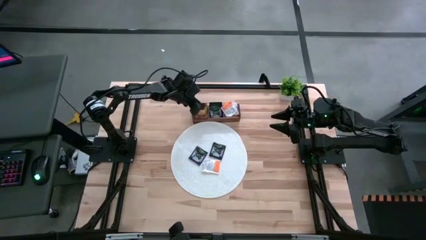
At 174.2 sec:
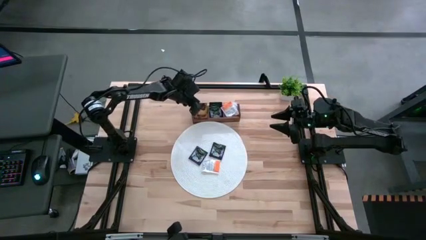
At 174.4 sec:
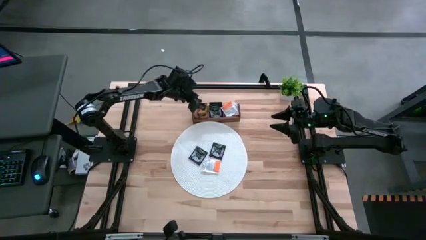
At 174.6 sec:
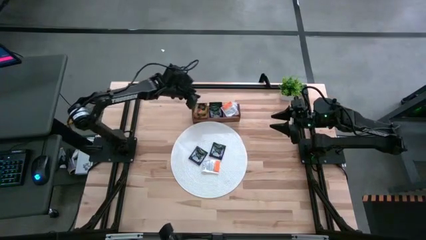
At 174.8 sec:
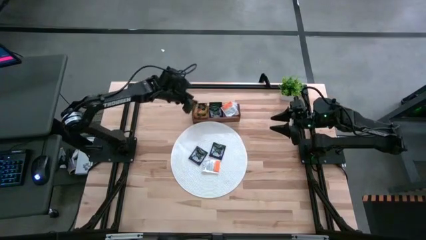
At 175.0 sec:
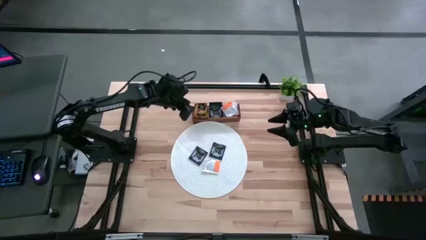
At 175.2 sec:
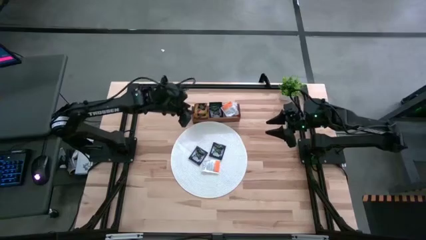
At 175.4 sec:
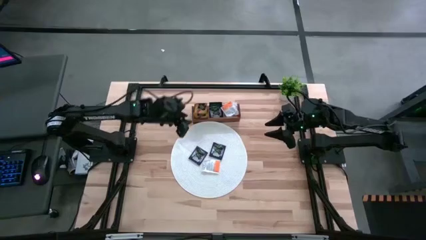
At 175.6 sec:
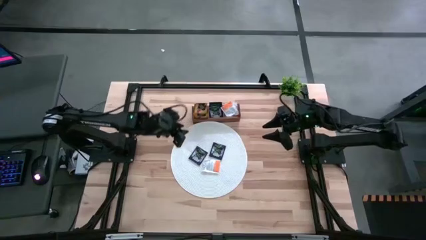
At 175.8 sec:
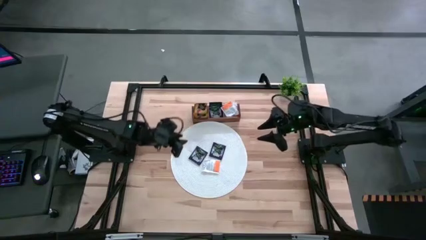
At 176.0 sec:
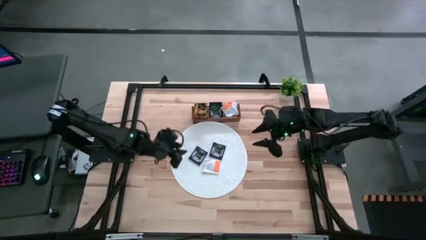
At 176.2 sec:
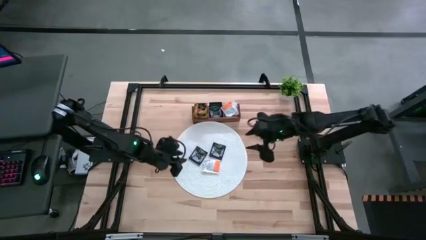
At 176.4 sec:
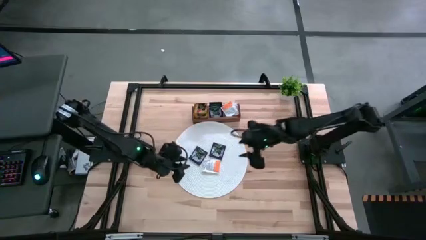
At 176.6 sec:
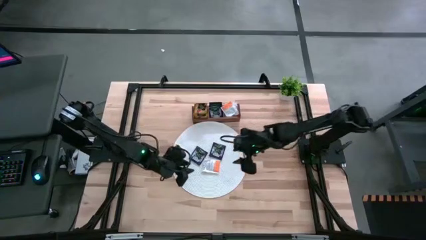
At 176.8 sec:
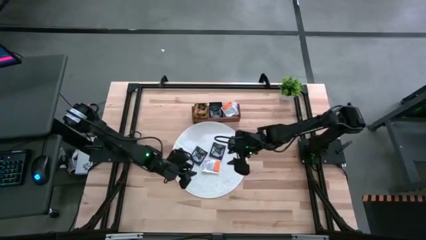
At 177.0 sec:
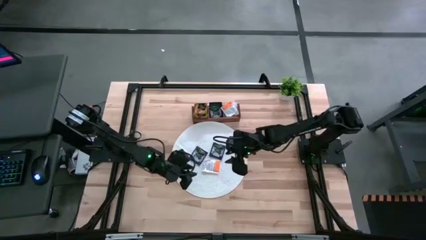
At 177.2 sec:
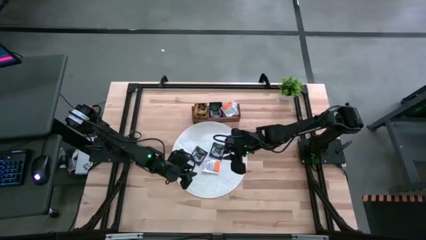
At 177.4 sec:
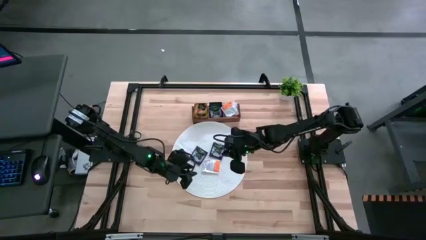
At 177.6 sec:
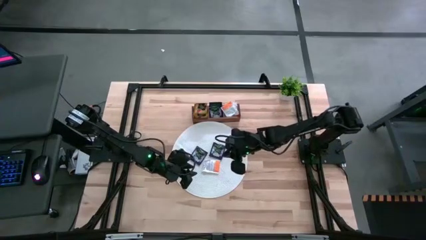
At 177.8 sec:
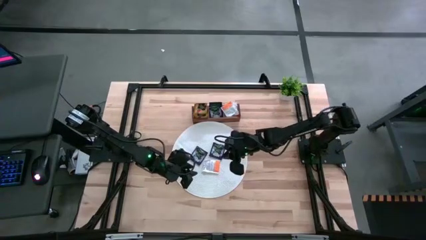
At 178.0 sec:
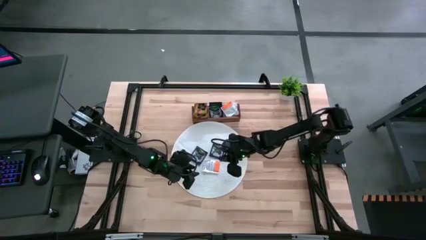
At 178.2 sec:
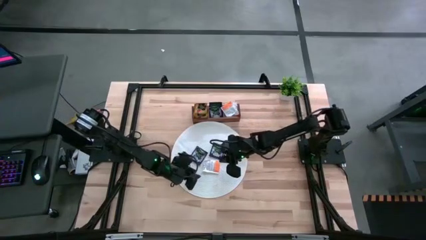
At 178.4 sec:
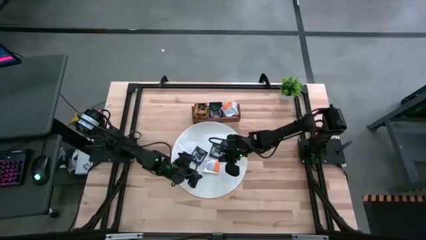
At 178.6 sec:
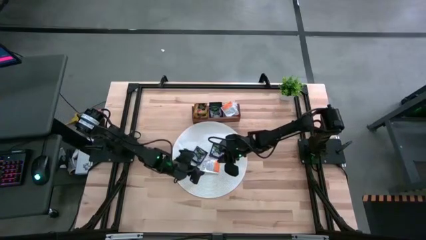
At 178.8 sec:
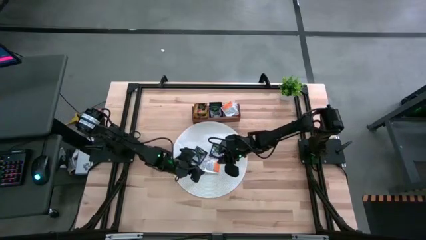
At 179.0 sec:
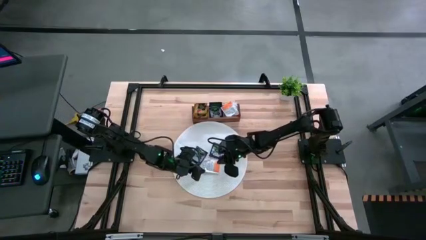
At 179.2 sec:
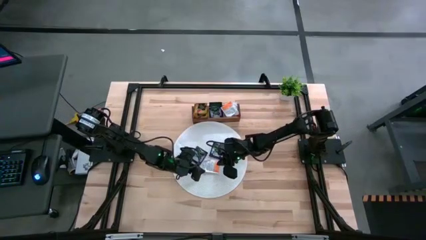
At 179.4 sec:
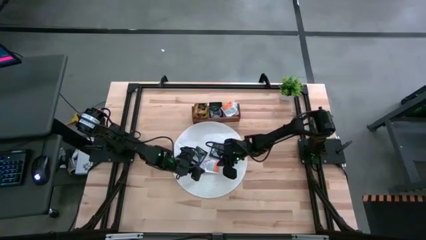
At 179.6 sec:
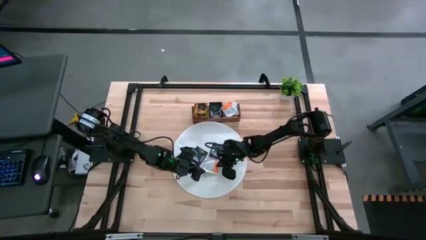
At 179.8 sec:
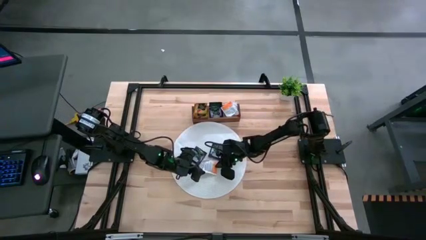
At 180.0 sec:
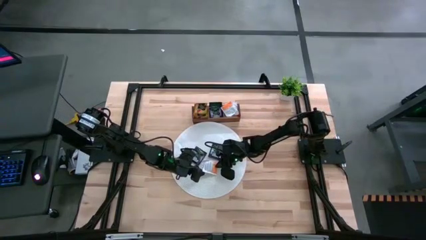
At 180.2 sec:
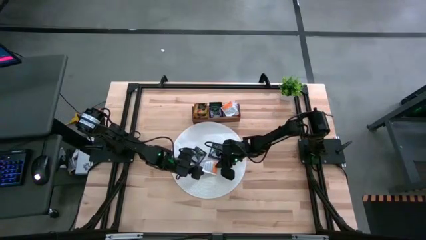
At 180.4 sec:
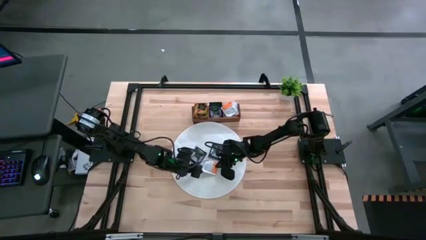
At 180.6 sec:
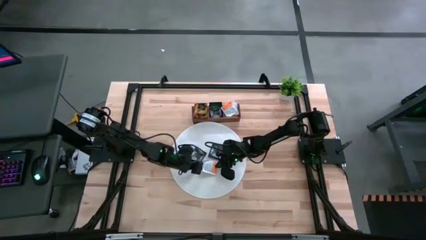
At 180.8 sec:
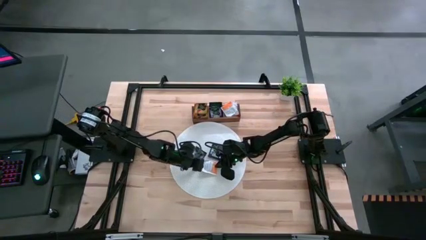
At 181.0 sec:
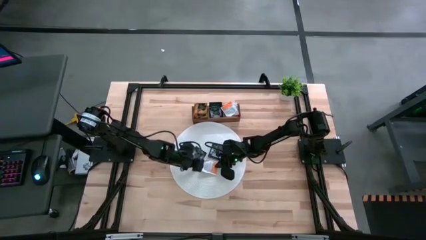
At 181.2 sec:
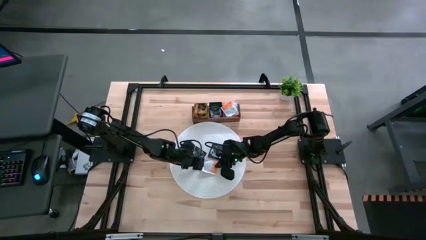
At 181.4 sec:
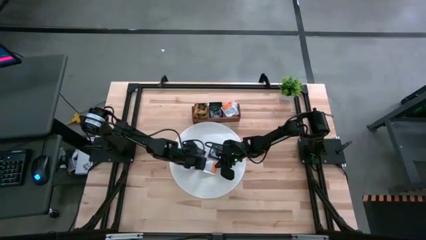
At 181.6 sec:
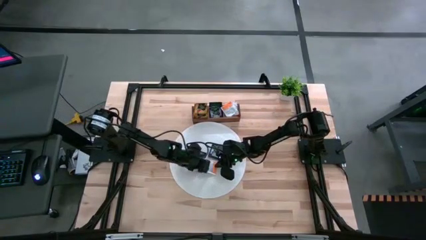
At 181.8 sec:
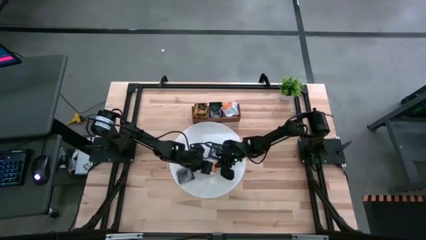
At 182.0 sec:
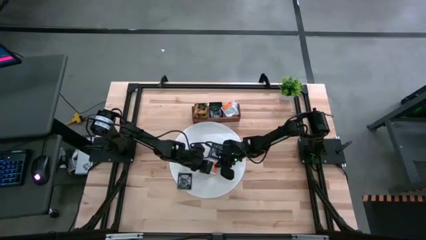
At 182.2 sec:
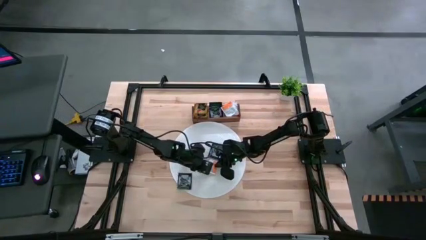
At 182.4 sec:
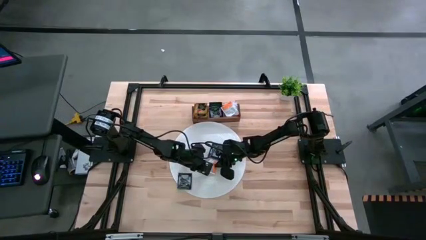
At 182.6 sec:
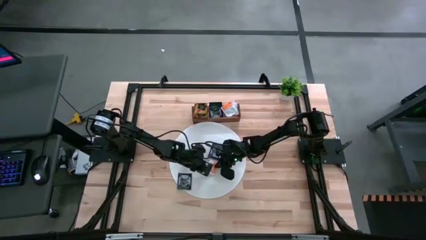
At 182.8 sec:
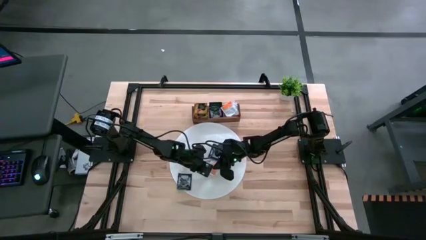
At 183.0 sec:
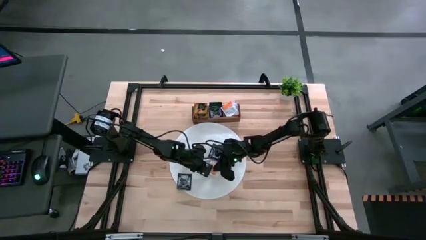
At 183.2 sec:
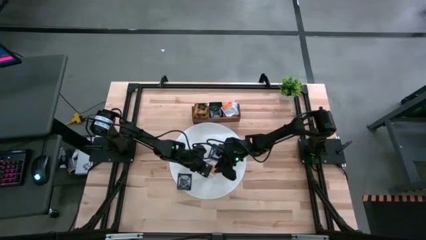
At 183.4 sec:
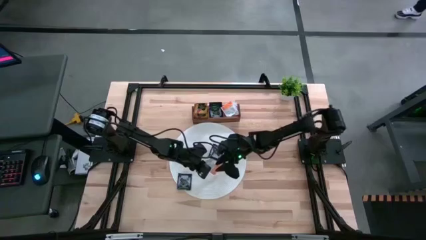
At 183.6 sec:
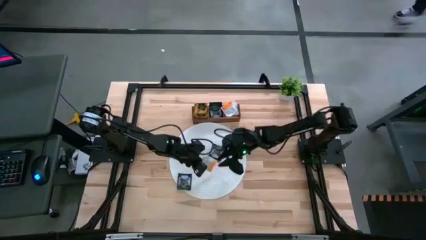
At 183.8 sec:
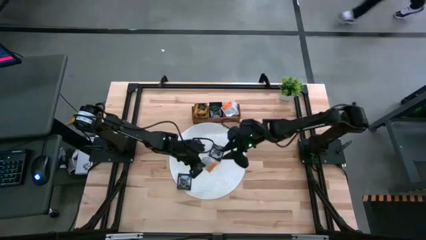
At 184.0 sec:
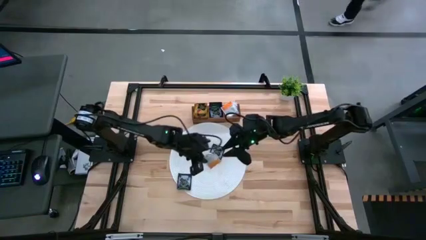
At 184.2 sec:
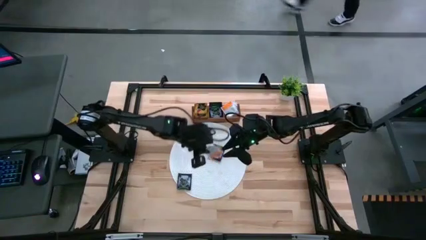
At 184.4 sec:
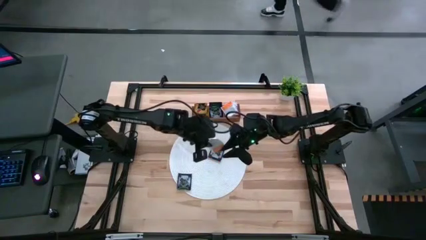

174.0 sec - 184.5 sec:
Task: Pick & Place Tea
Put the white tea bag into the right section of the wooden organizer
